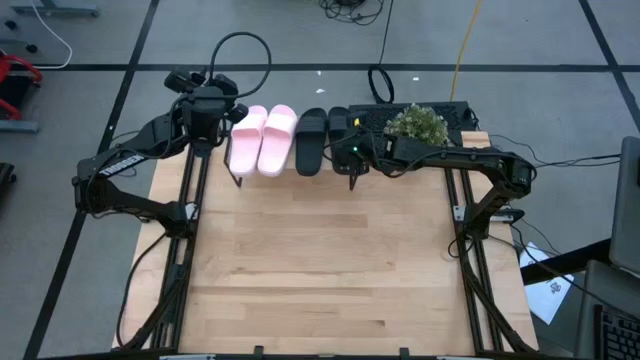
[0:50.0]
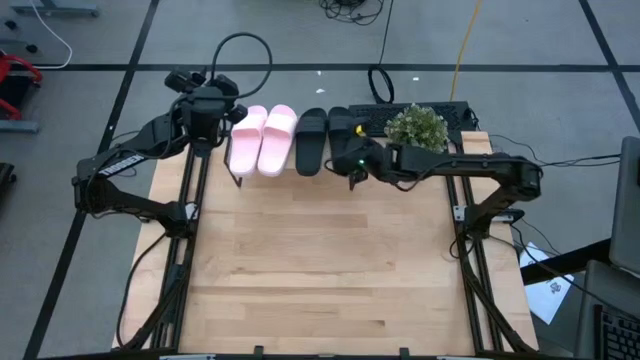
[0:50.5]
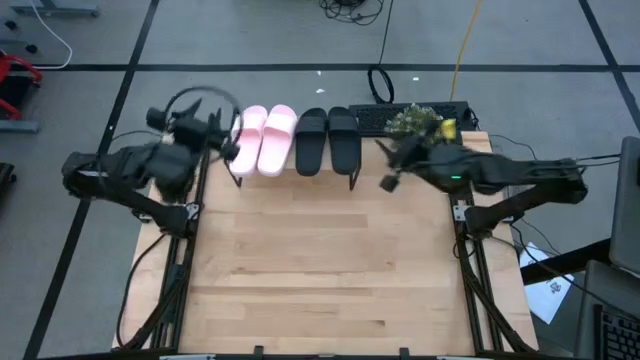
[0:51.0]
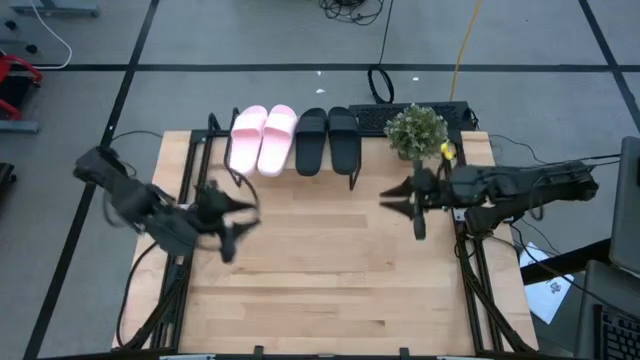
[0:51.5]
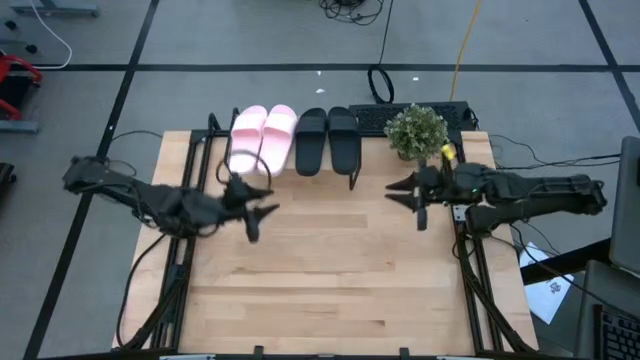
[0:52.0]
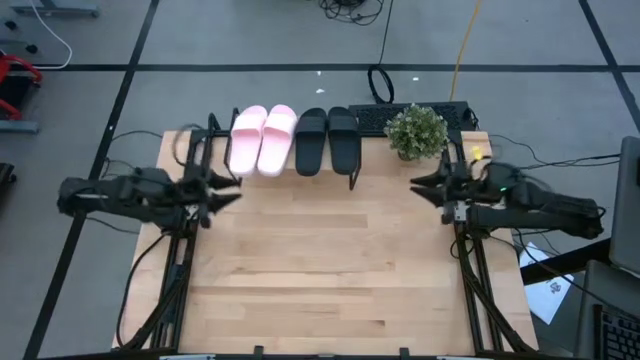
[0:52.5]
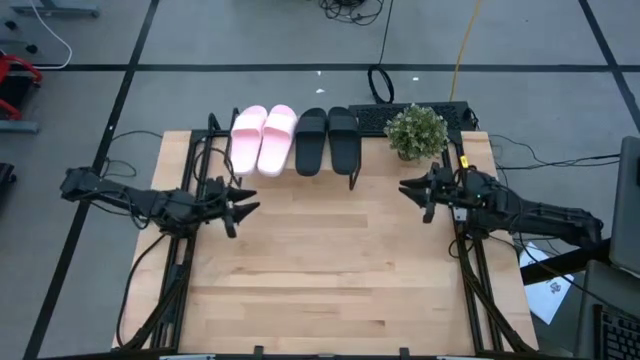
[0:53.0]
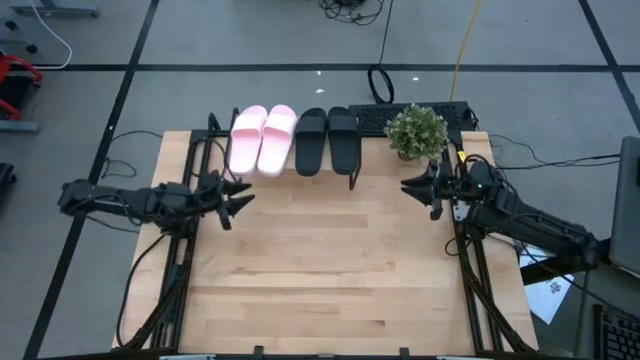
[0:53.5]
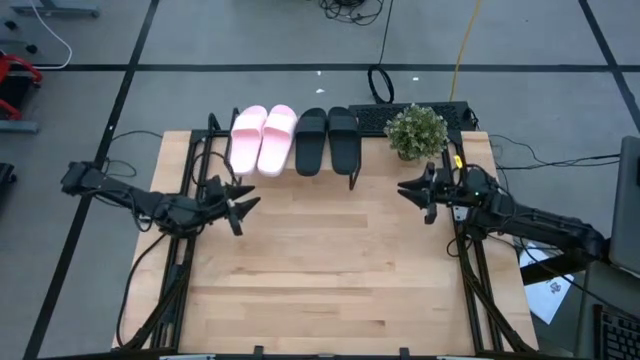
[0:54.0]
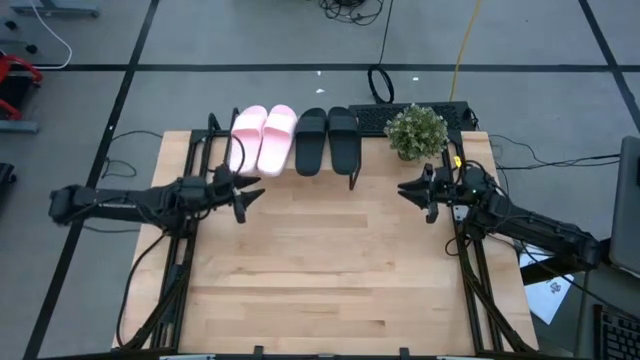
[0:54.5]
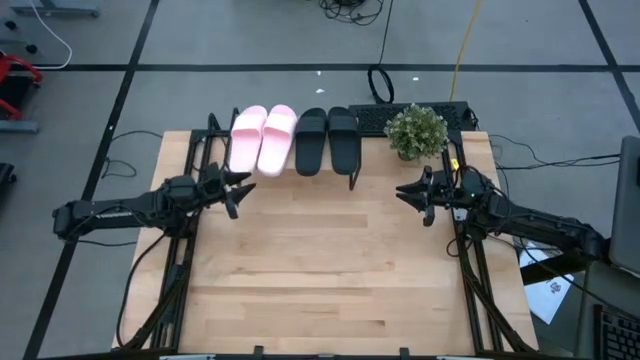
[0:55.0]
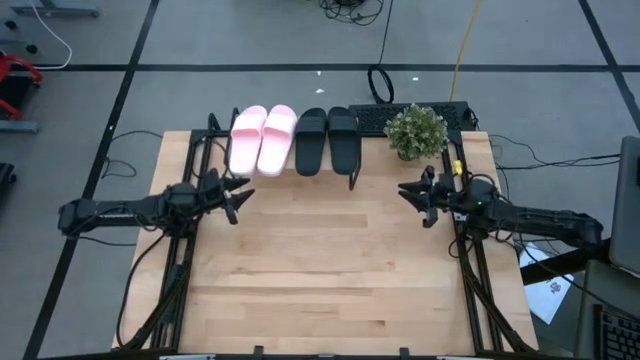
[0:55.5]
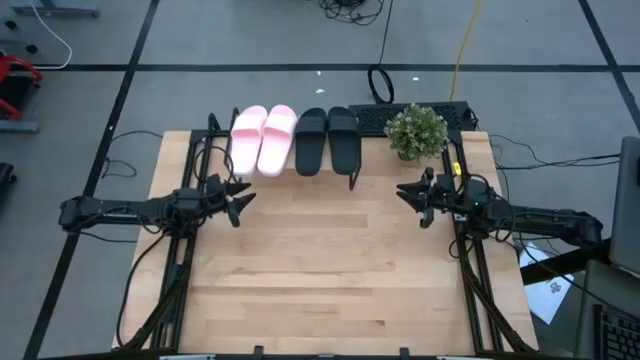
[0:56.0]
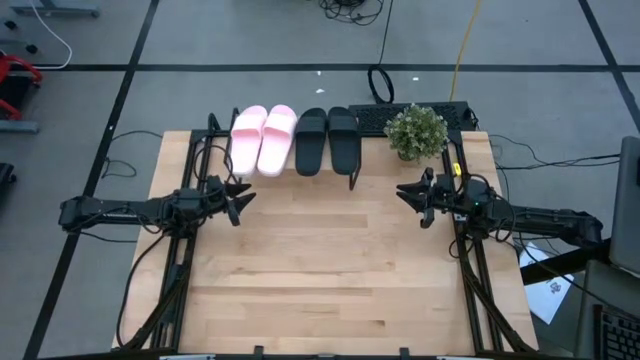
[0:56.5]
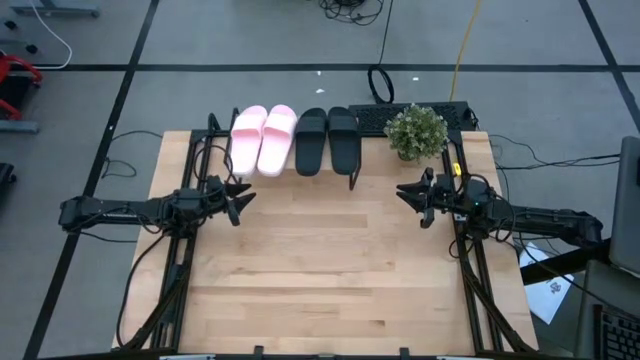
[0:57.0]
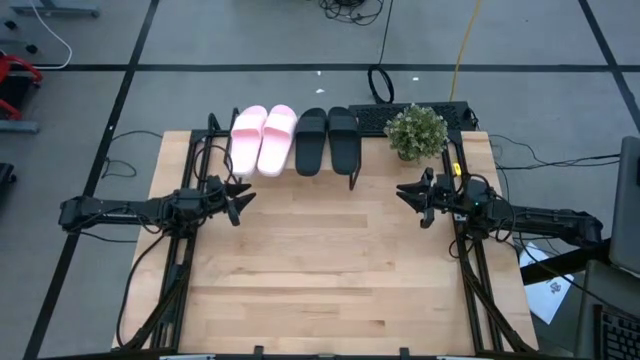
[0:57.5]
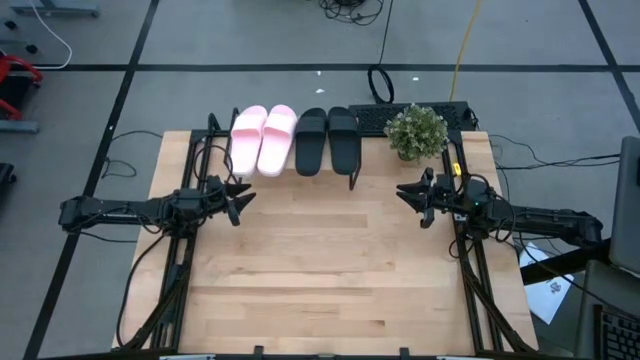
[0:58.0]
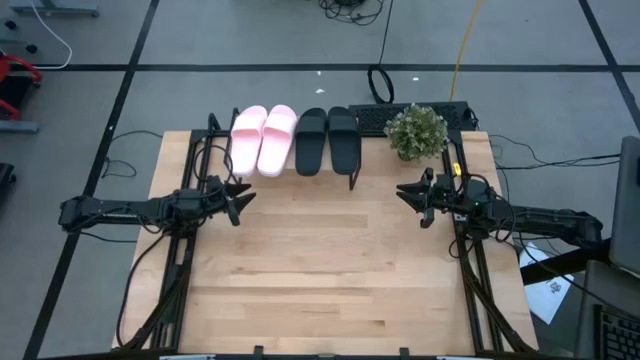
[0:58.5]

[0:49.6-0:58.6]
Task: Pick and place slides into the shelf
Return to Home Position

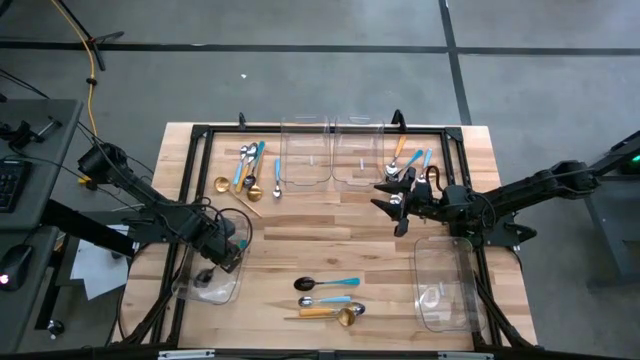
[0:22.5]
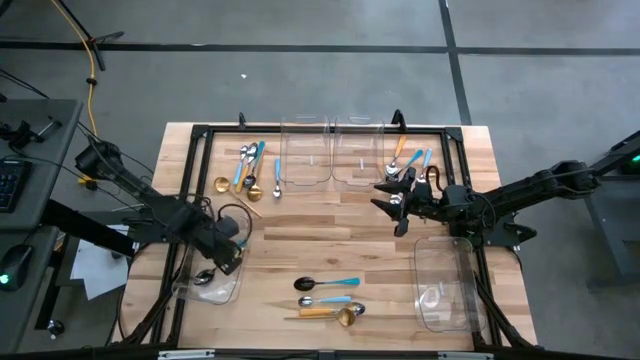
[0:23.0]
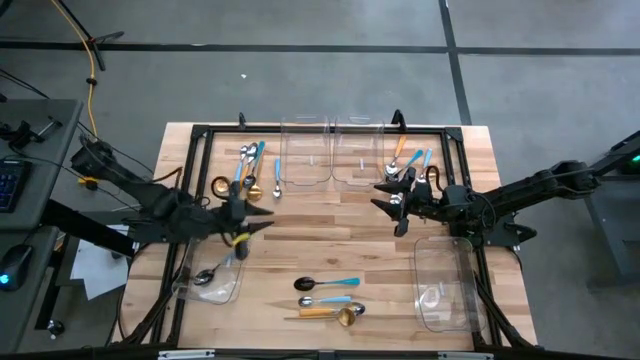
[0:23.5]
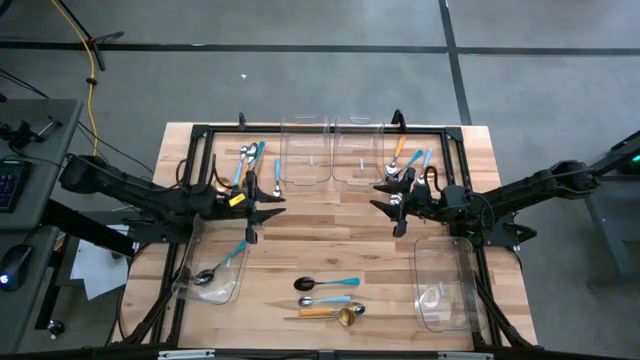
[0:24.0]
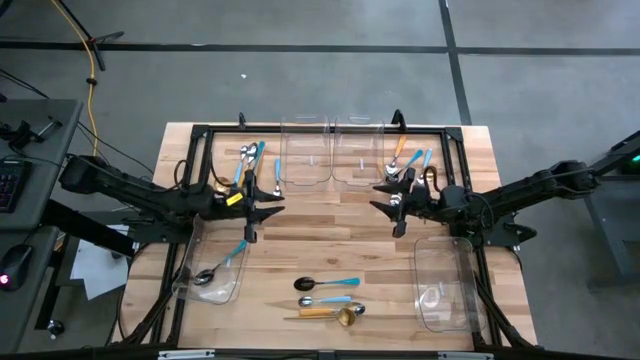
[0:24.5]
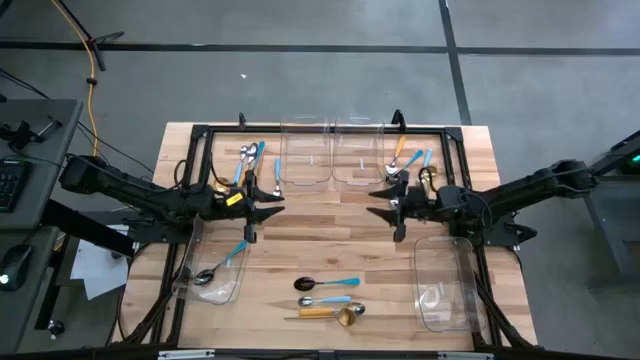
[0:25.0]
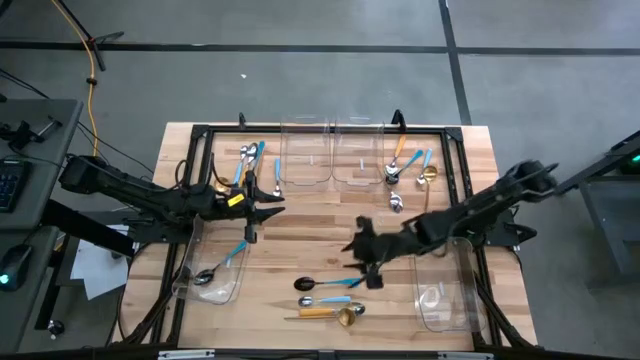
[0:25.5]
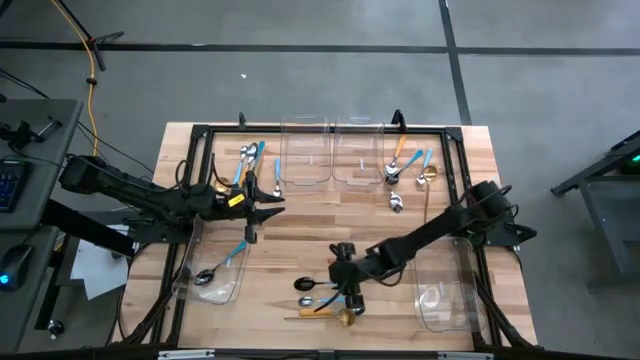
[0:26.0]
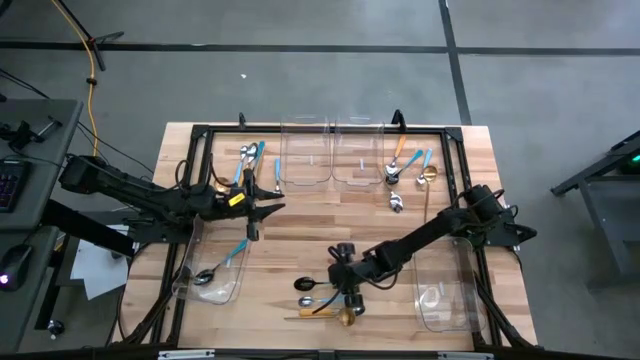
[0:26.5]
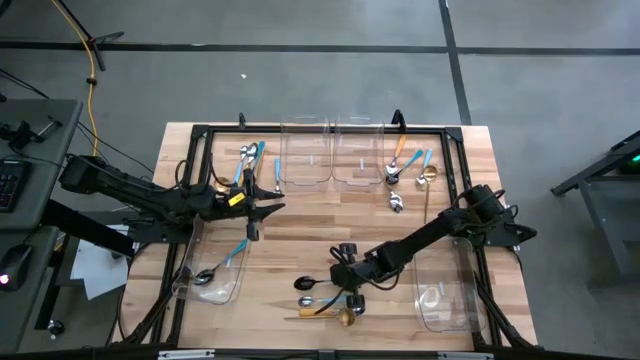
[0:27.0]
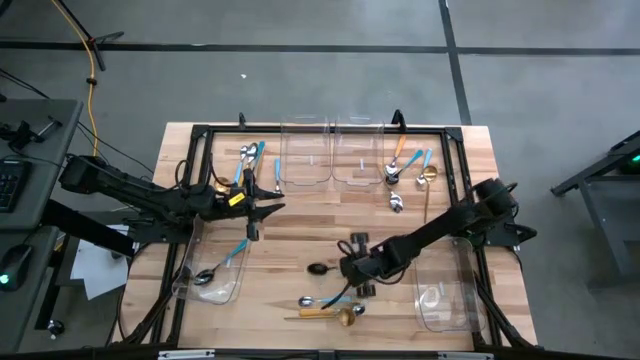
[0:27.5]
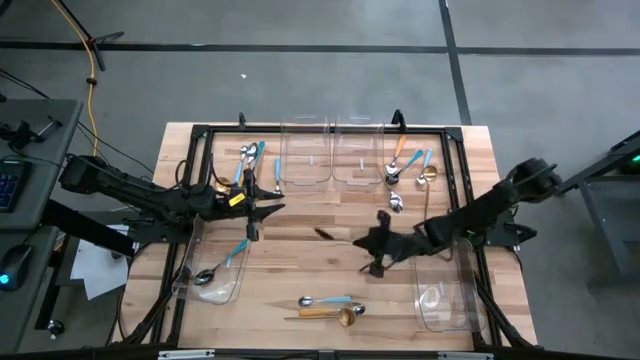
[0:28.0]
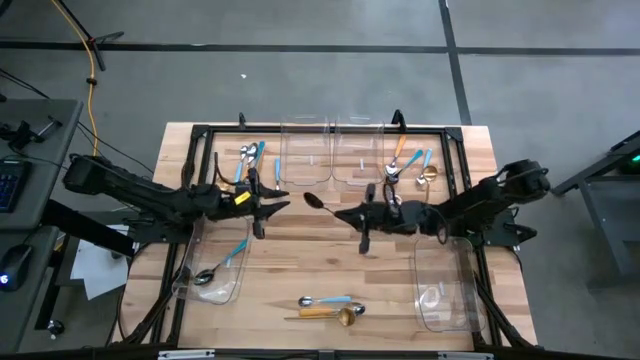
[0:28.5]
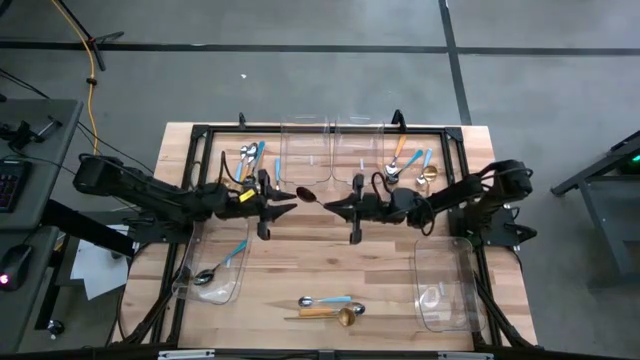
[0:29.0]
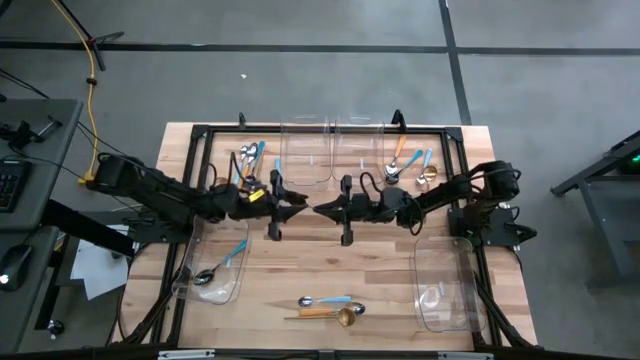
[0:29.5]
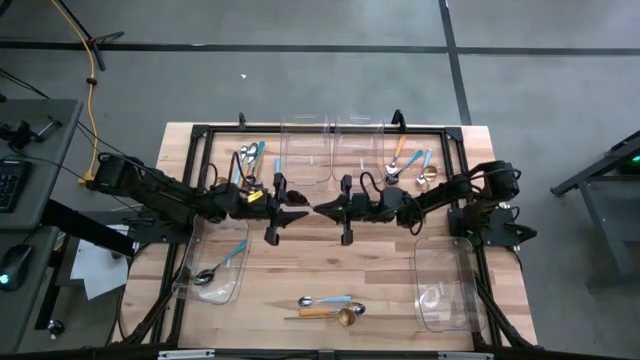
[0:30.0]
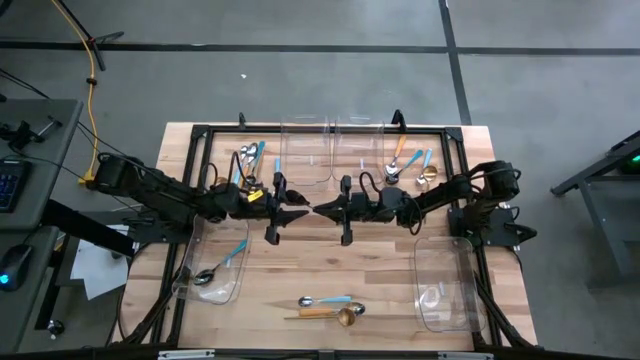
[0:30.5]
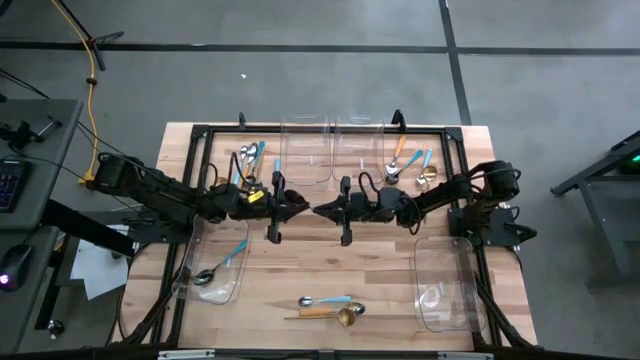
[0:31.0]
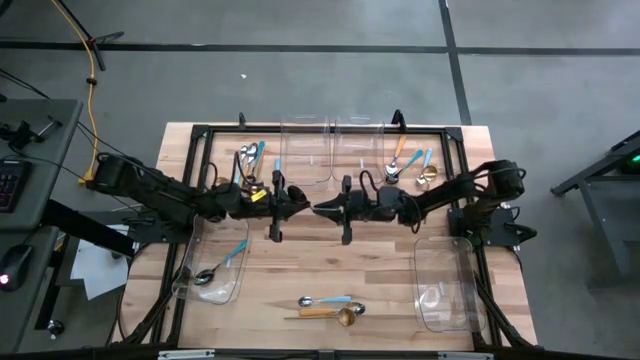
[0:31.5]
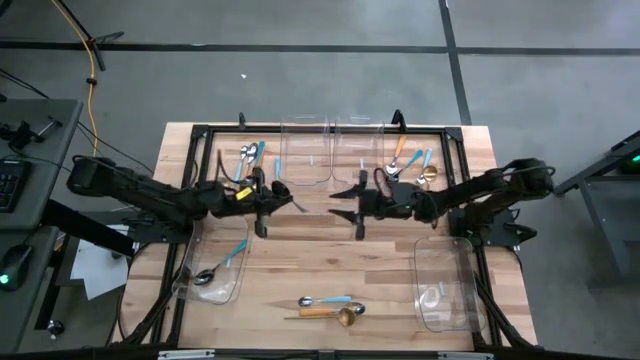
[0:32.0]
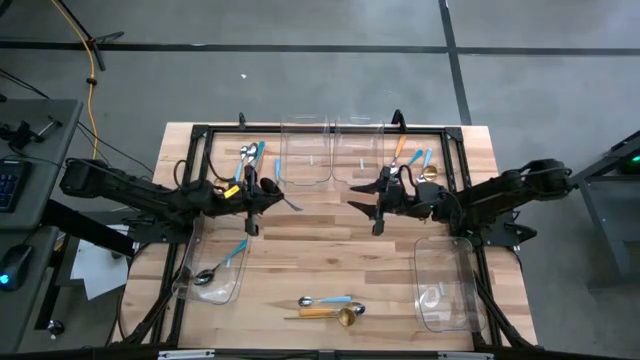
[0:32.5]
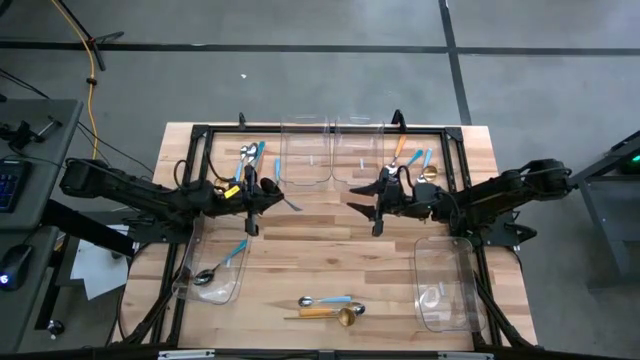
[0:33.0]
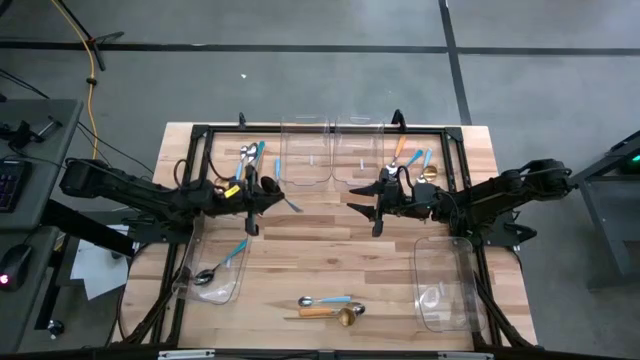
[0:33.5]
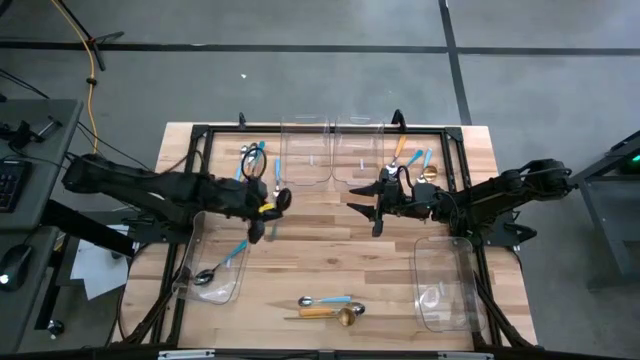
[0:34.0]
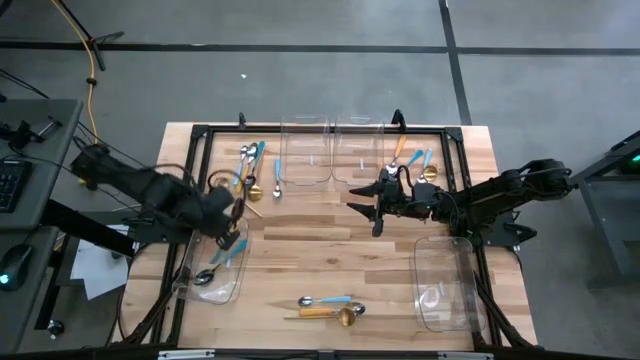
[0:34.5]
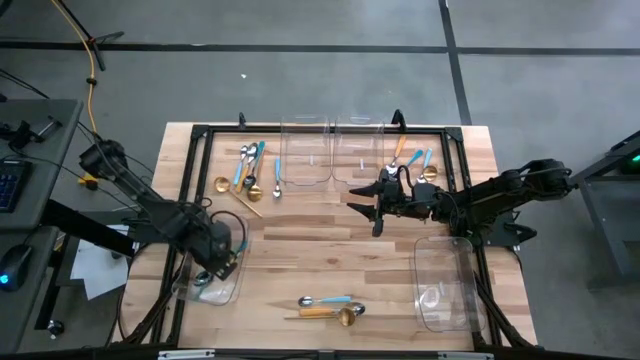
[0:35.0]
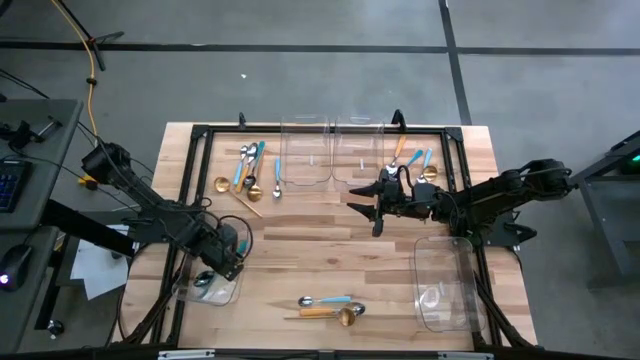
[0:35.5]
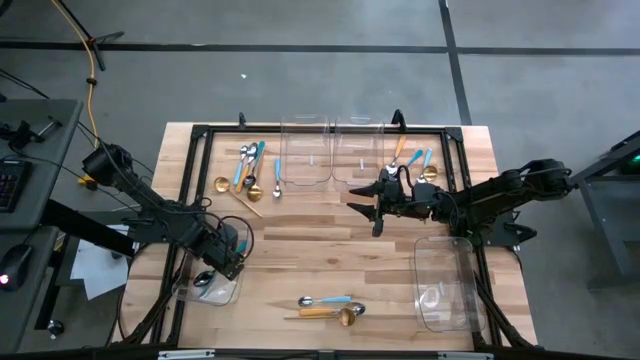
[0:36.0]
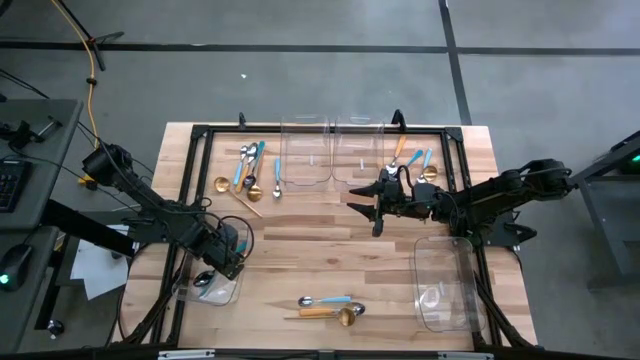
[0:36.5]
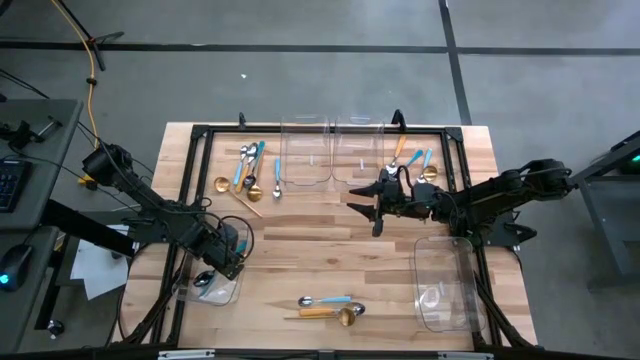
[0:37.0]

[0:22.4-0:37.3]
Task: Sort silverware by color (type)
Put the black spoon into the bottom left transparent bin
